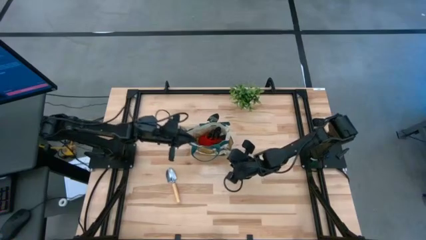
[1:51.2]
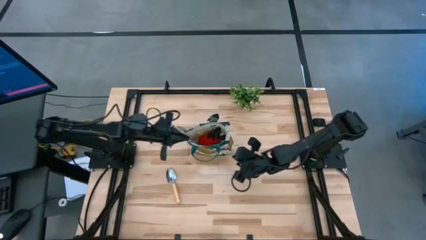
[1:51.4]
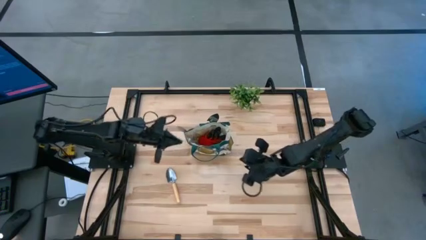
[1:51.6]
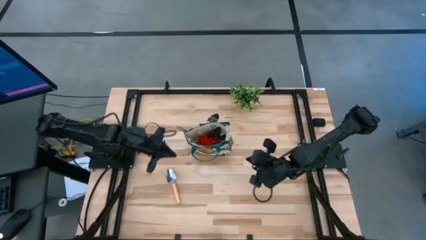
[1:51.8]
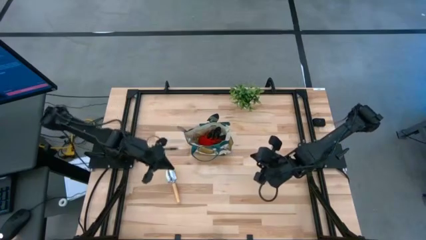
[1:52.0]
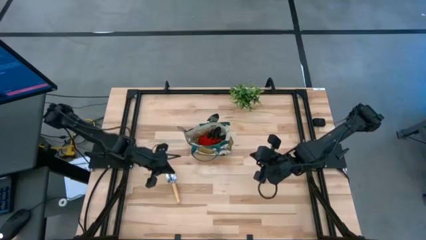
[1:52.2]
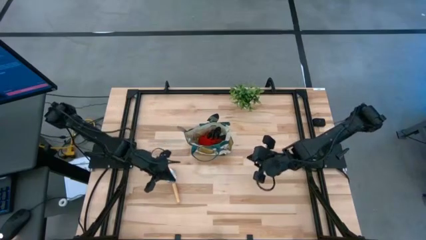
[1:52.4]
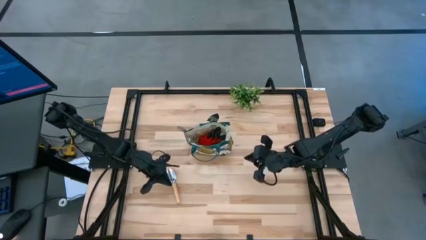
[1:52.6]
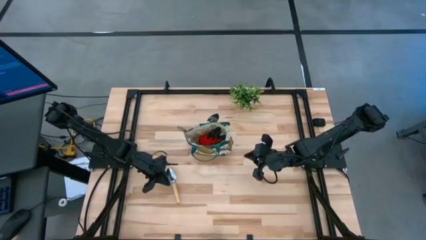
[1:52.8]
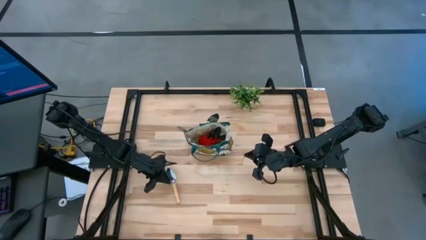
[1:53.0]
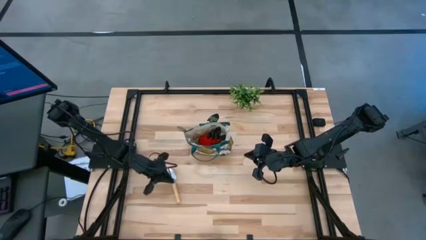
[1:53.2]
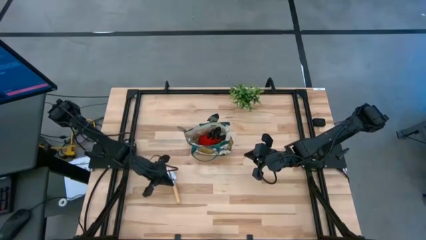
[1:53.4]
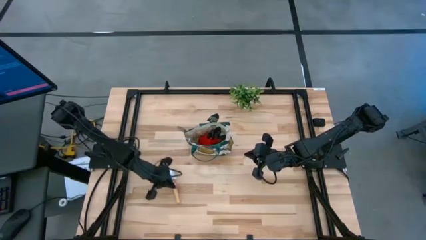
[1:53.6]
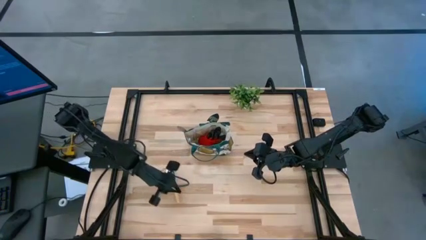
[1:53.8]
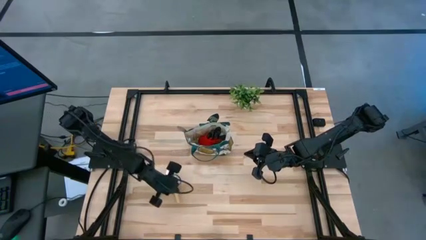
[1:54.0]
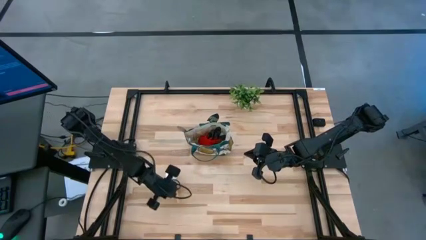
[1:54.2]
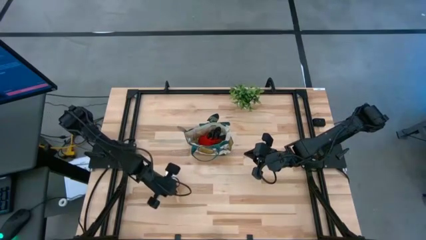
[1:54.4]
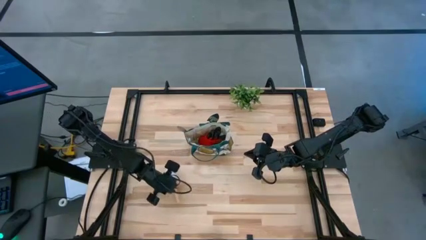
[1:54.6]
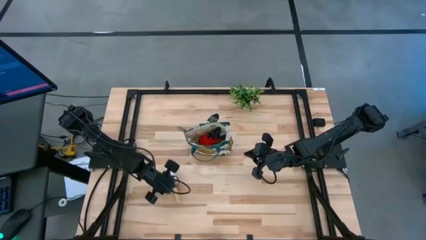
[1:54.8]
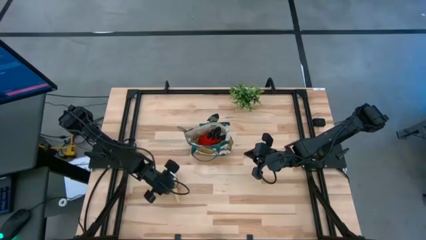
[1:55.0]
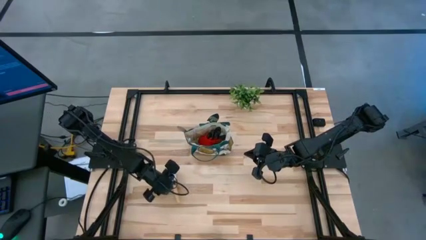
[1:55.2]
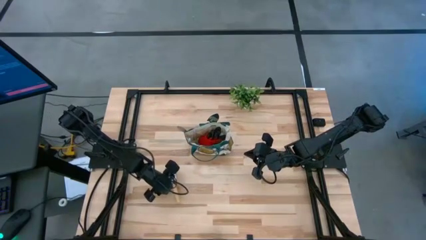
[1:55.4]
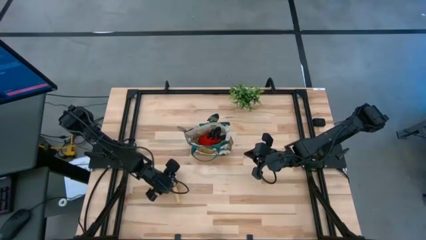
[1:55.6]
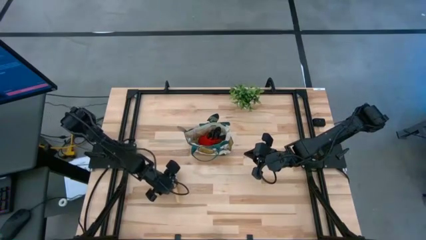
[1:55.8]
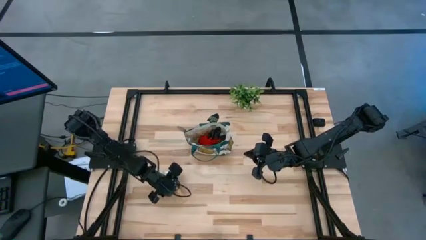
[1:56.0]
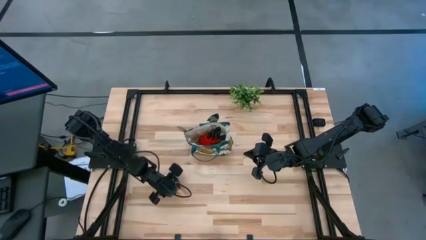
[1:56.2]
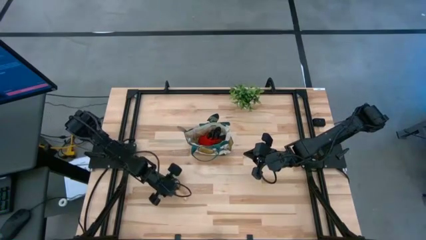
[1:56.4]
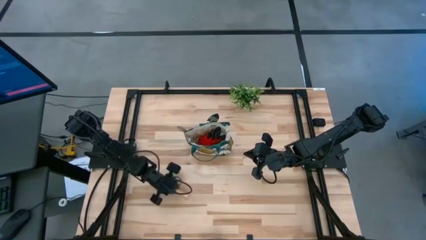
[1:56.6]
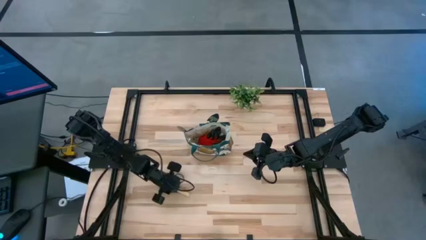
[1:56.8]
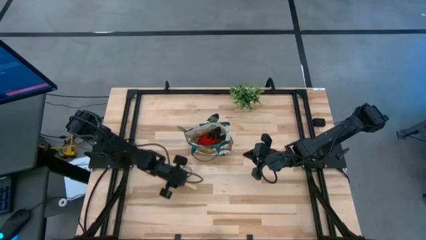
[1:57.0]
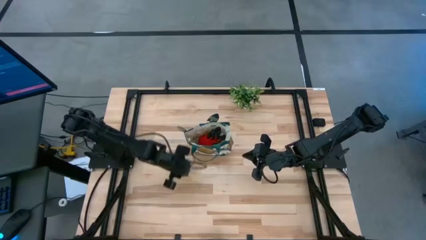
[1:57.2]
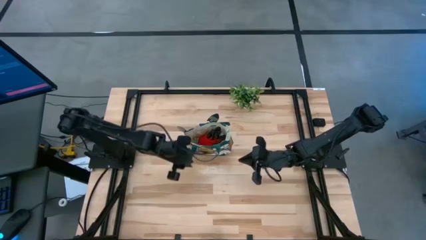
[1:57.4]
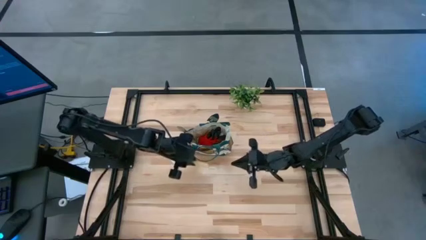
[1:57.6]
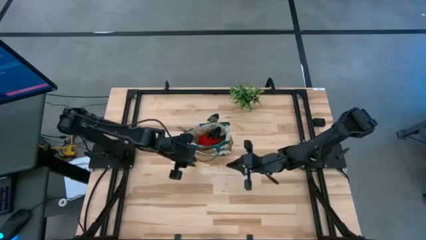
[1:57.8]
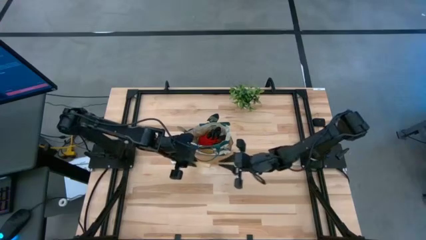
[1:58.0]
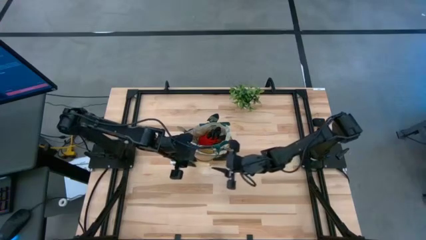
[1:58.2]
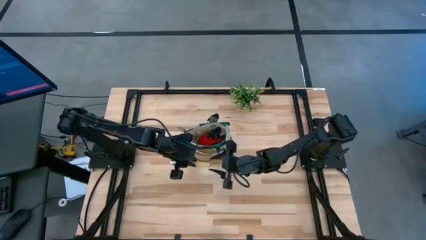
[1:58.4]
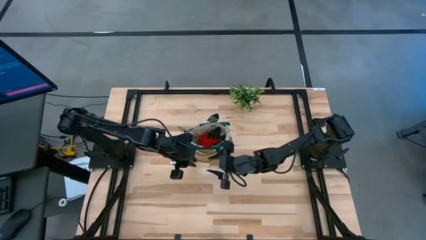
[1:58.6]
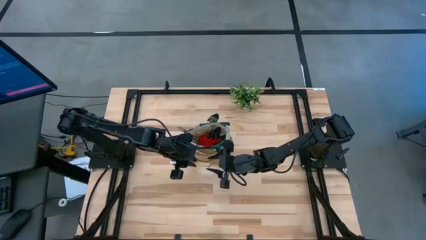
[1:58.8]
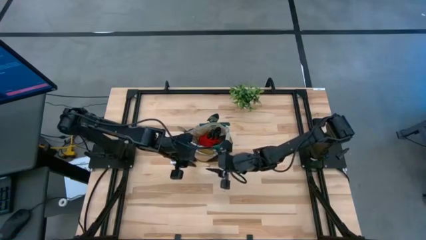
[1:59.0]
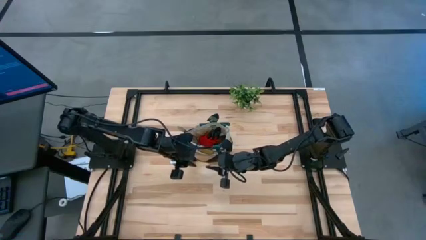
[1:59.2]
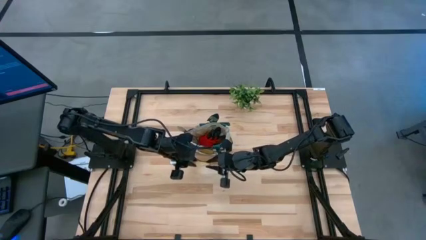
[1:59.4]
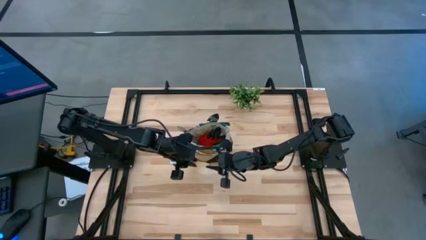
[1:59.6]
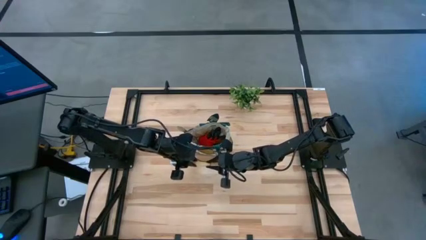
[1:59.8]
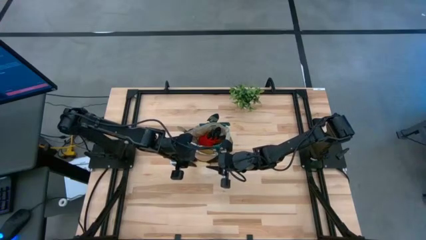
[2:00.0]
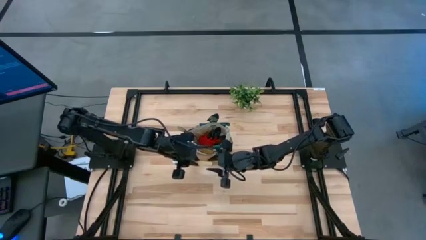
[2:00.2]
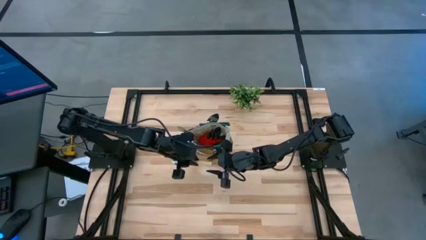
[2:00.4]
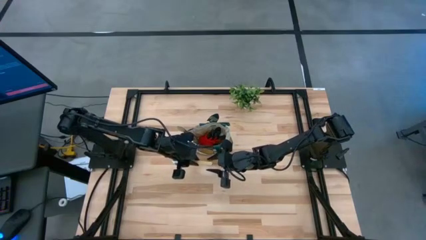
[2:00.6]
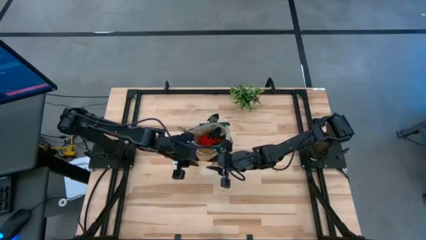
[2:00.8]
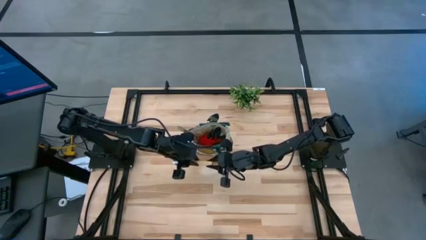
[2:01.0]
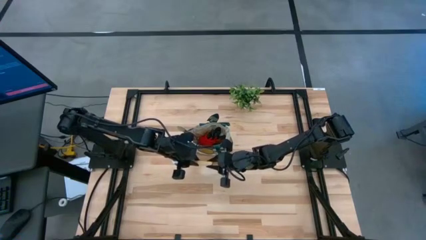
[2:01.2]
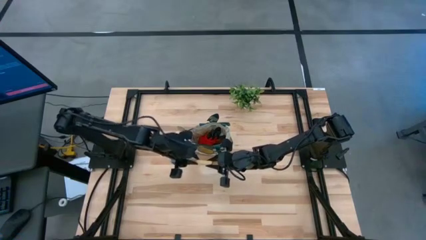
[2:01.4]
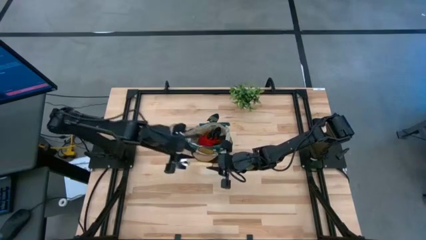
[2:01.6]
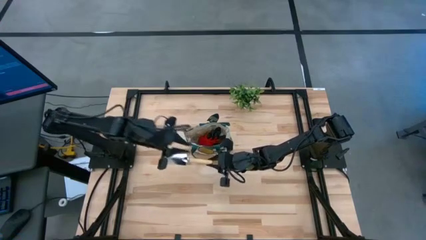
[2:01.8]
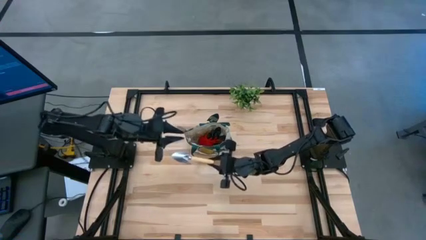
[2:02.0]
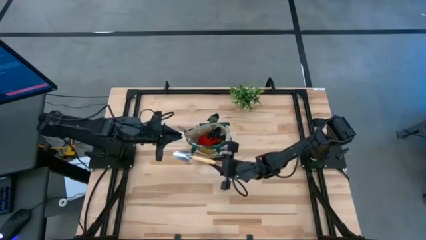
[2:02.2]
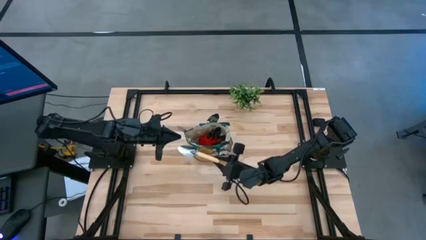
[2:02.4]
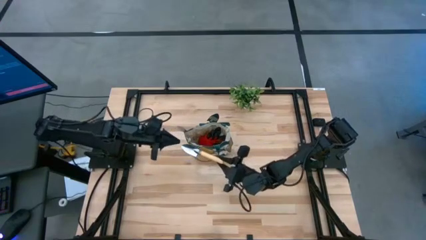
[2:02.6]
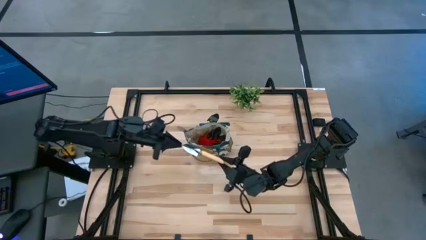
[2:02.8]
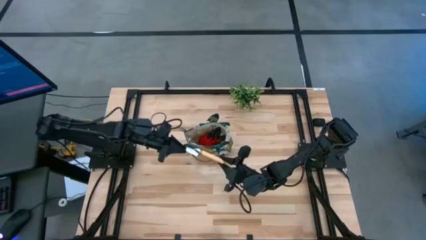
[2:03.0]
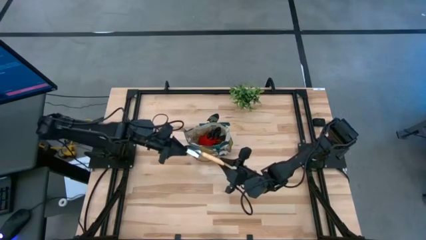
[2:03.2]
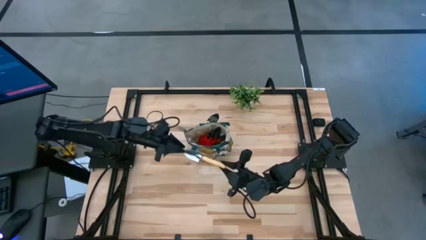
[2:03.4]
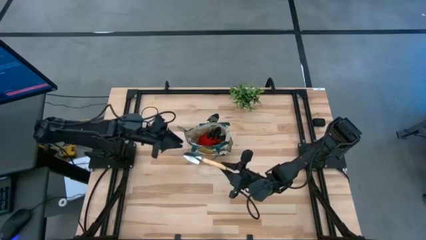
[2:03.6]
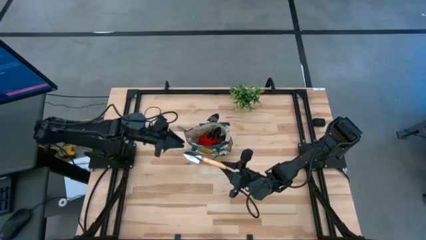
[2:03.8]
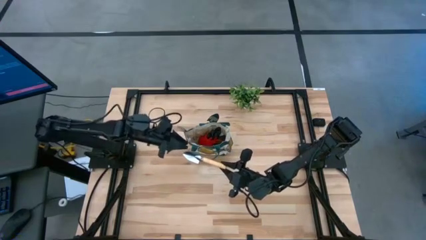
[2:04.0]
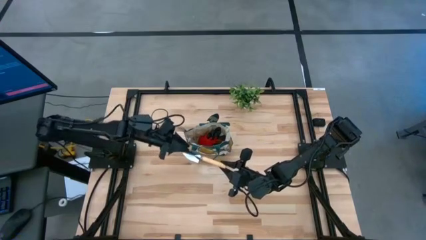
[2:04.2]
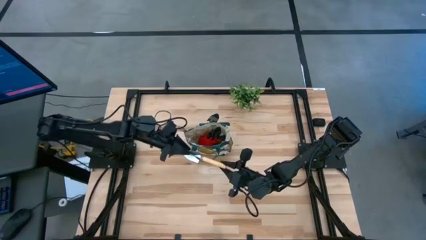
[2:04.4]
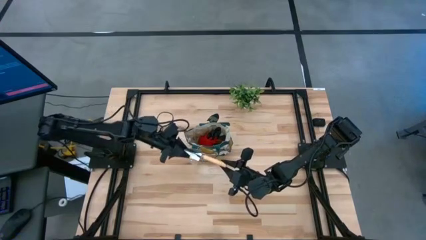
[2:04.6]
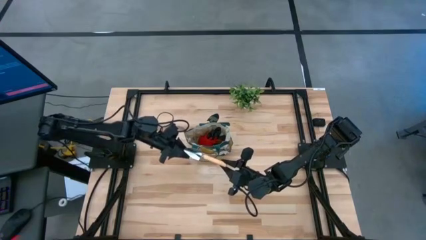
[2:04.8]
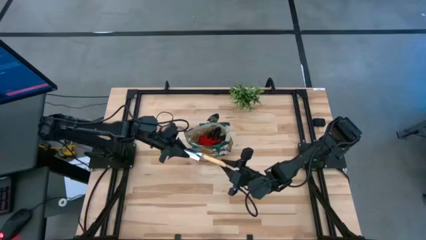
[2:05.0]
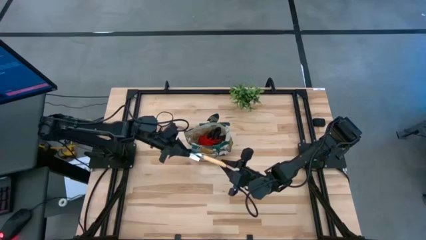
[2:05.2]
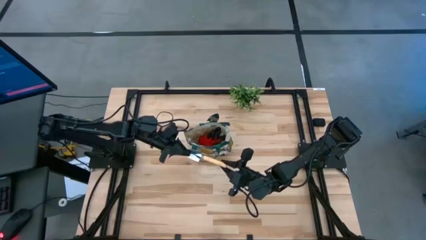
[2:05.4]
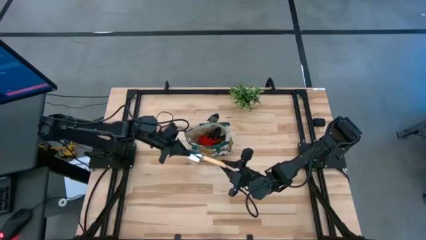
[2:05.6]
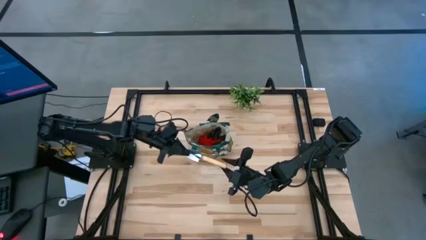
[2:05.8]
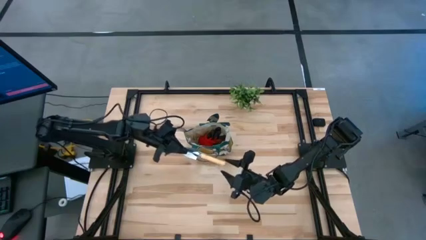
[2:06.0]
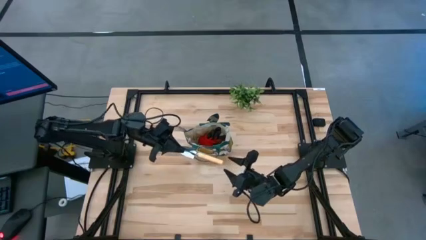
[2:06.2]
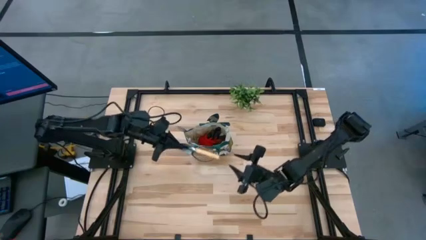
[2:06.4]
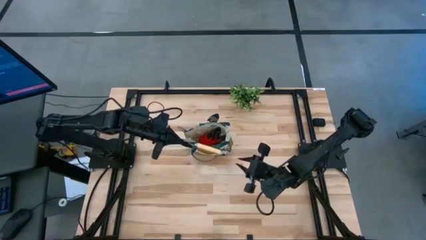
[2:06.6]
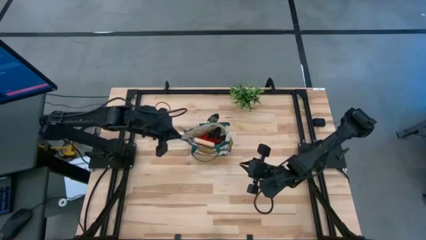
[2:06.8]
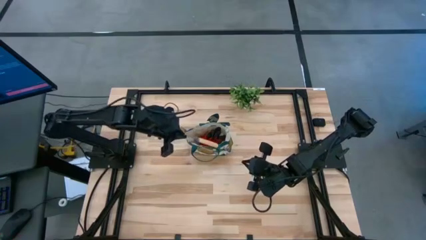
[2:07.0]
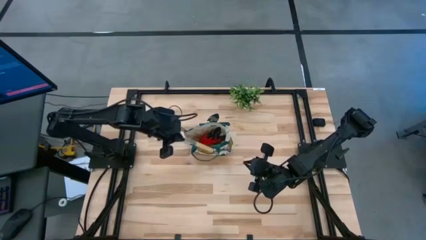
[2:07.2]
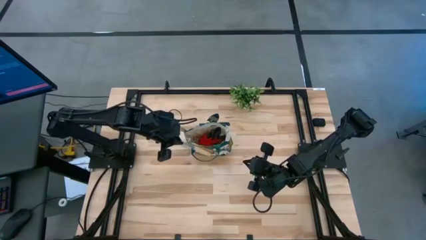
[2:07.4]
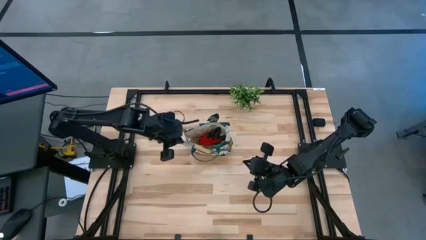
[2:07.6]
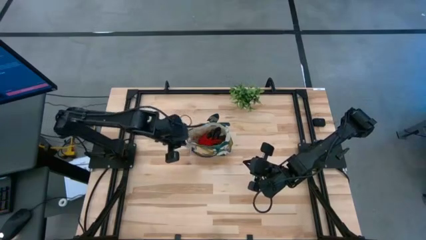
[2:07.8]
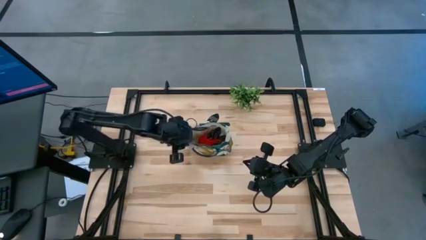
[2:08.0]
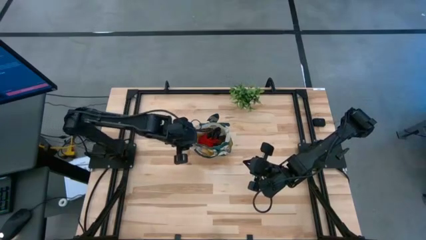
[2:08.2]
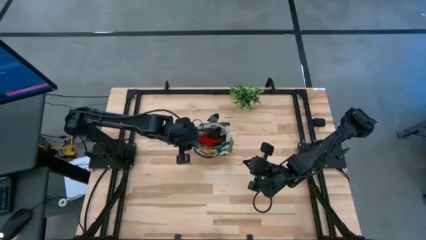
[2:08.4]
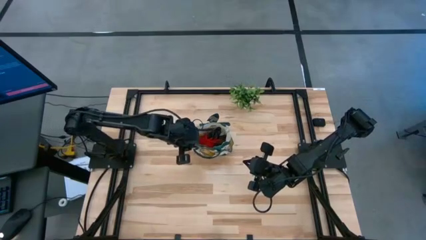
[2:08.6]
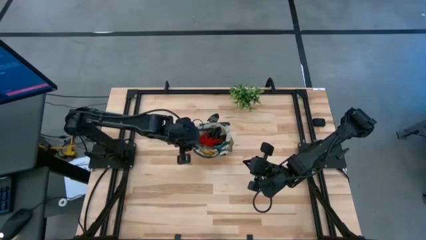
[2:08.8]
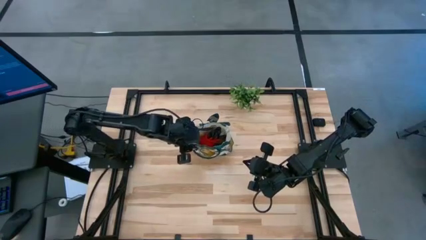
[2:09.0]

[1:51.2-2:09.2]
Task: Pick & Place Garden tools in Gardening bag
Put the brown trowel into the gardening bag
